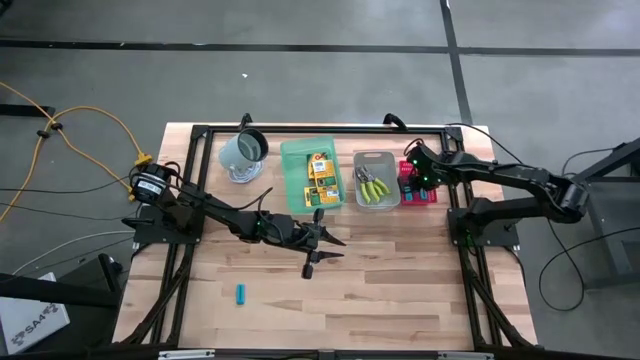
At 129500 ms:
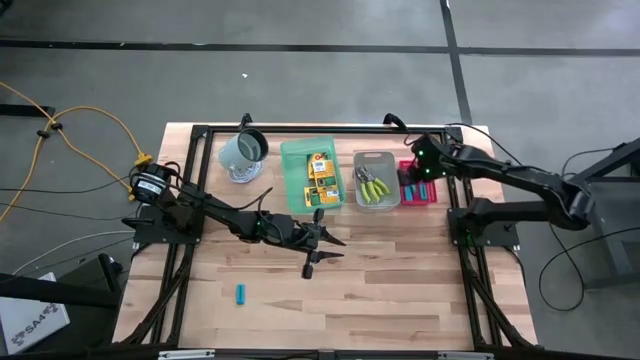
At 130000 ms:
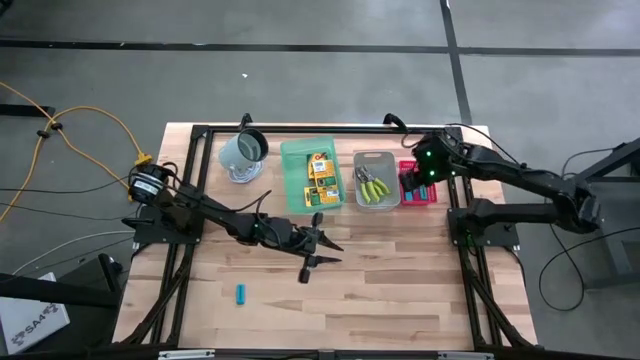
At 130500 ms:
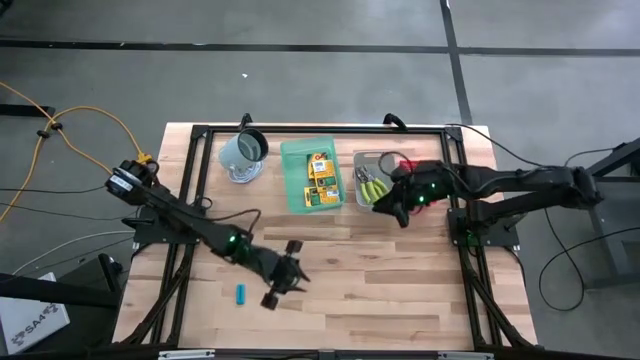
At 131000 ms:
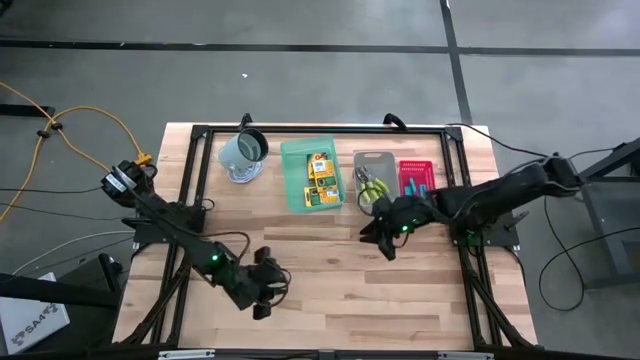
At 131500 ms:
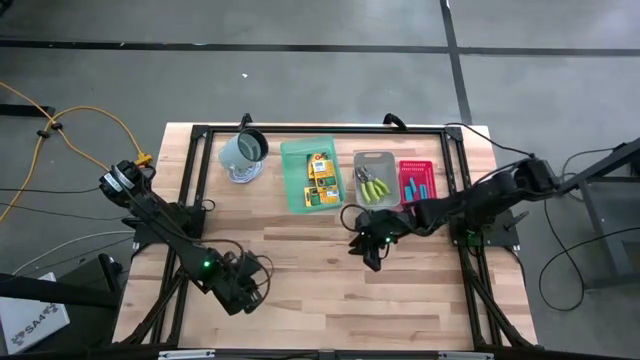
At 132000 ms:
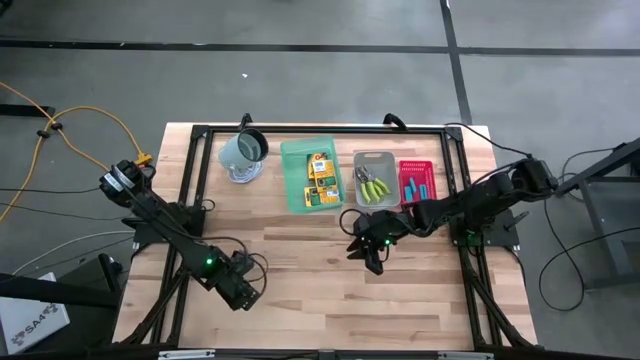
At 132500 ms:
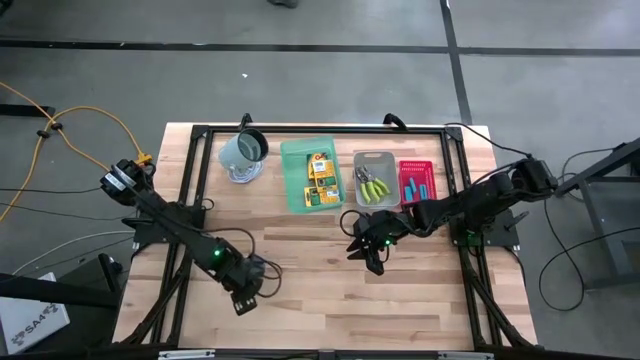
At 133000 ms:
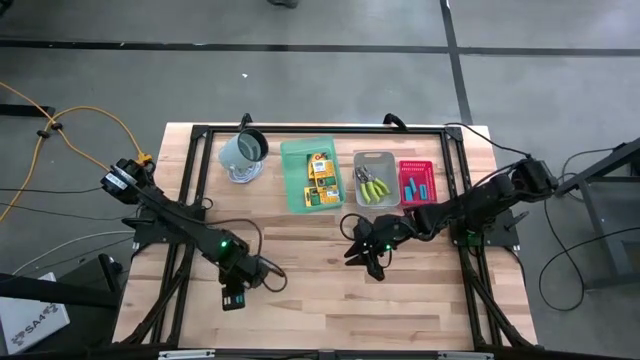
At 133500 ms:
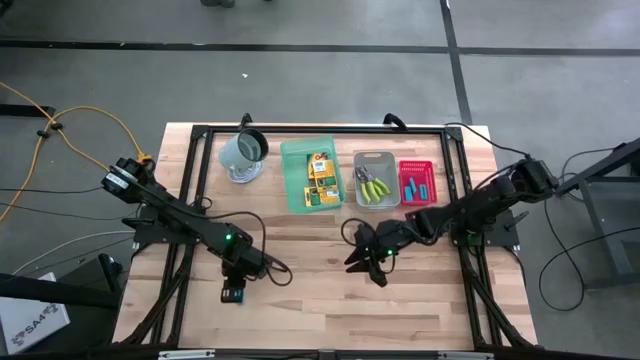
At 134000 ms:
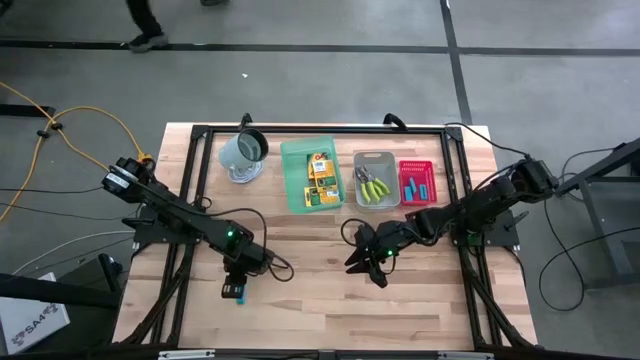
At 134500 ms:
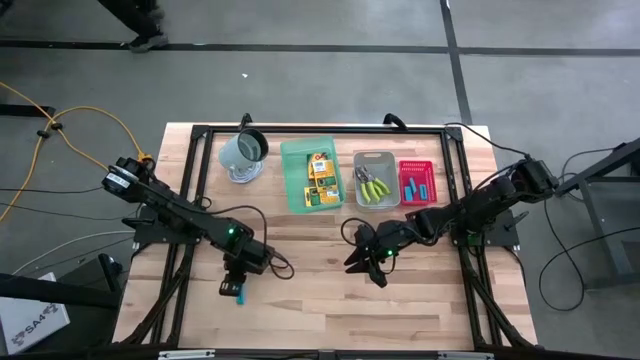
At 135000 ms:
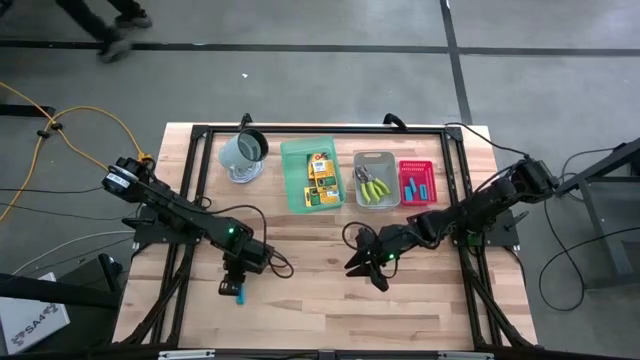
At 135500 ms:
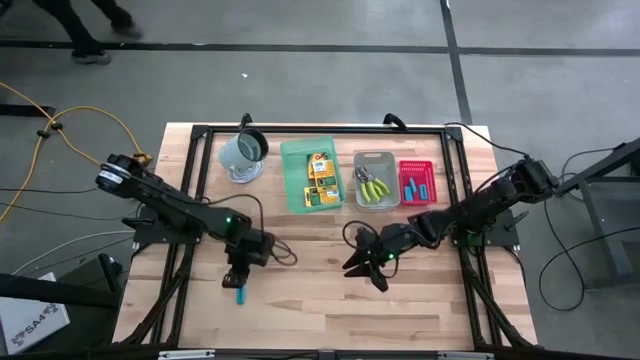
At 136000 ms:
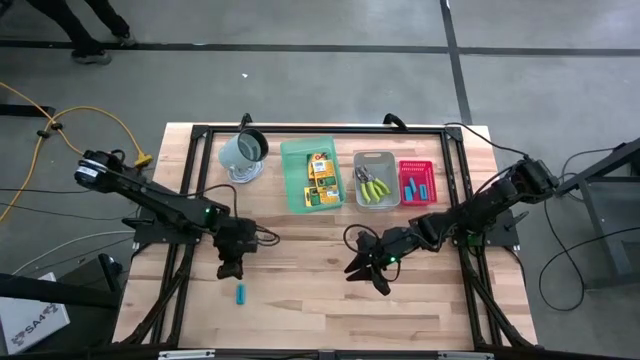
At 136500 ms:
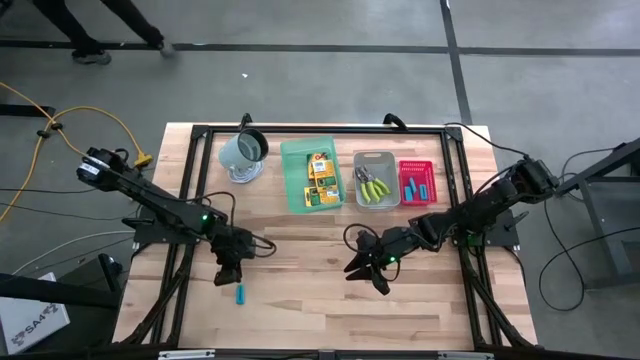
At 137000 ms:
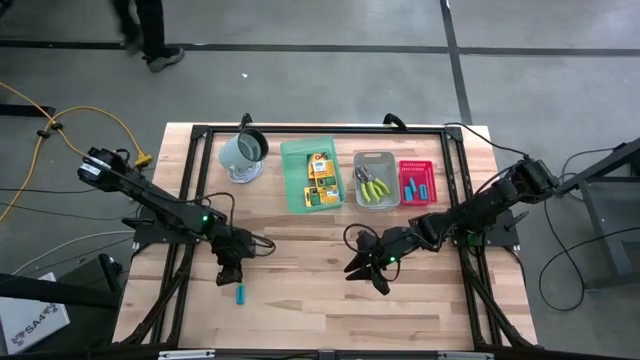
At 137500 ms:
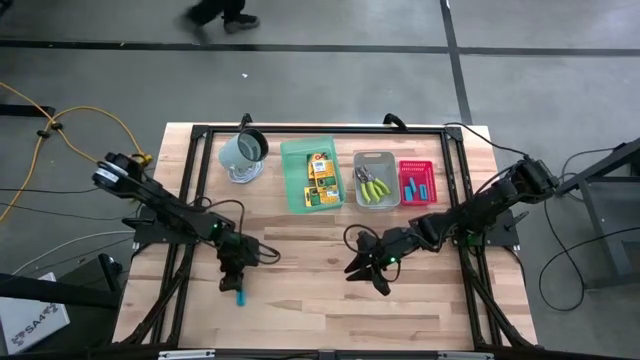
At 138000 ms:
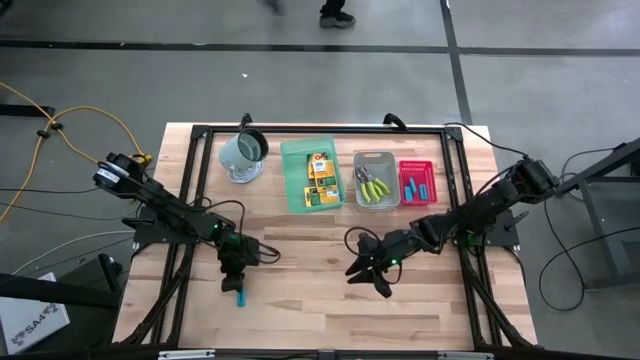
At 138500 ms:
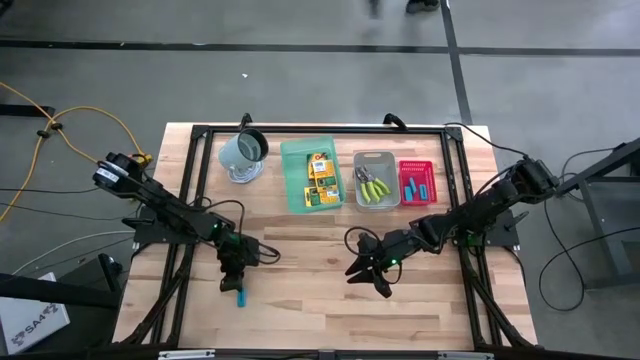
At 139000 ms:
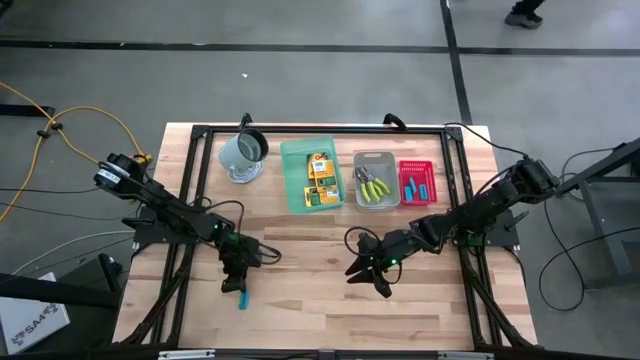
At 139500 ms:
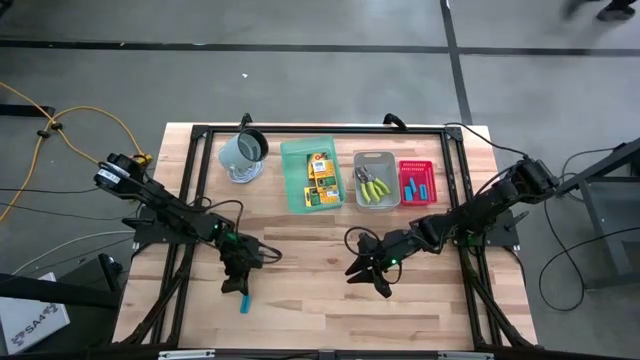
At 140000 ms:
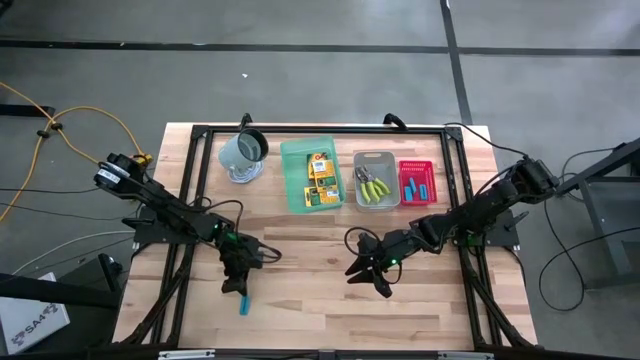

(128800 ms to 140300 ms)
Task: Pick & Place School Supplies
Put the blue eraser into the red bin

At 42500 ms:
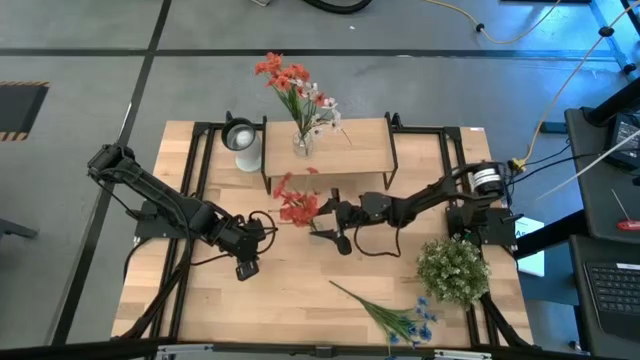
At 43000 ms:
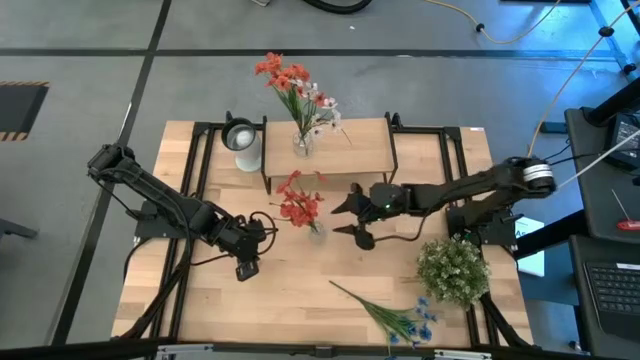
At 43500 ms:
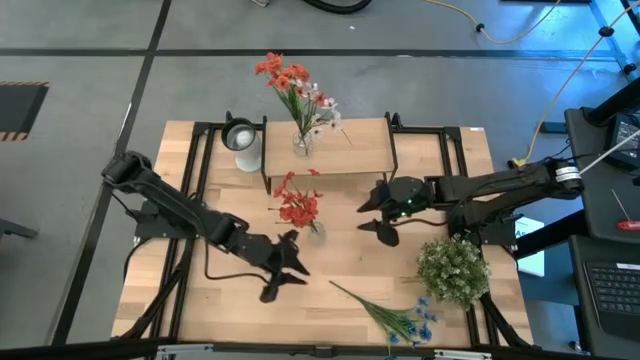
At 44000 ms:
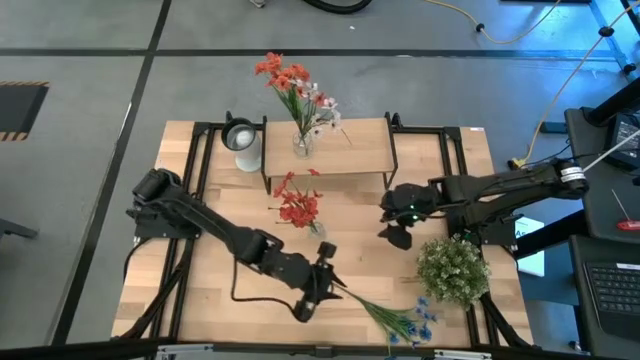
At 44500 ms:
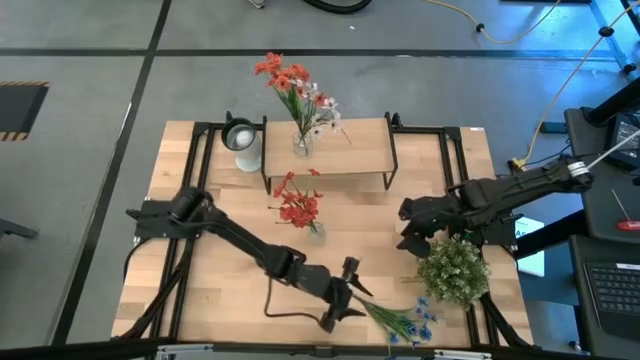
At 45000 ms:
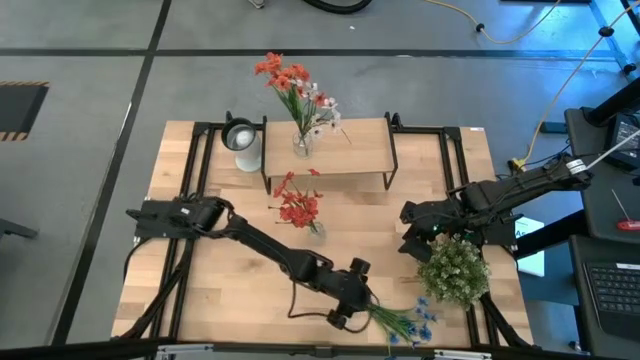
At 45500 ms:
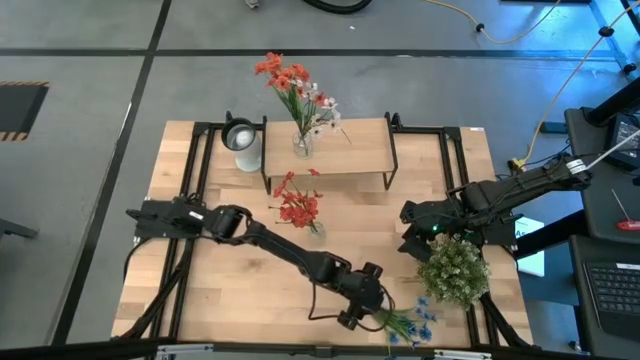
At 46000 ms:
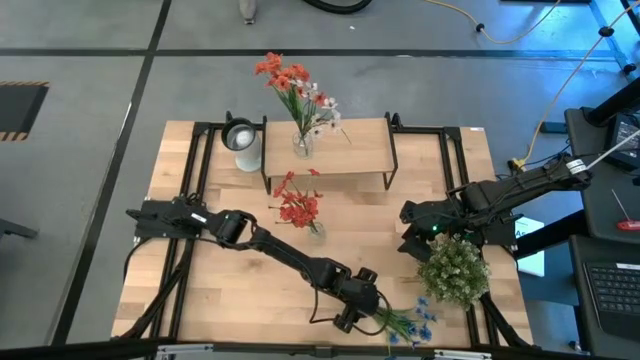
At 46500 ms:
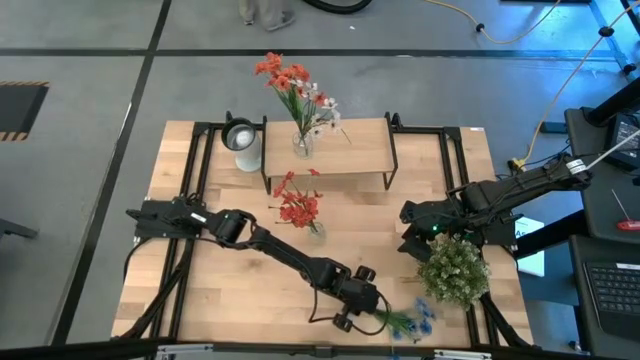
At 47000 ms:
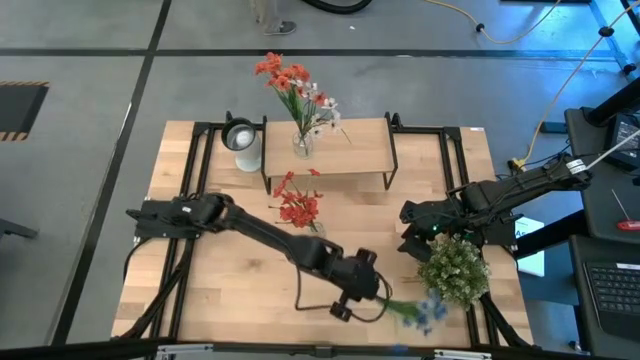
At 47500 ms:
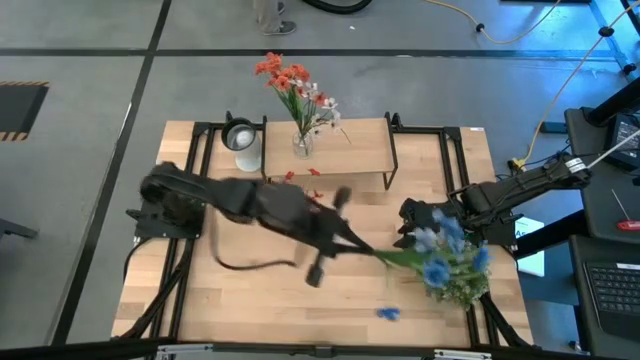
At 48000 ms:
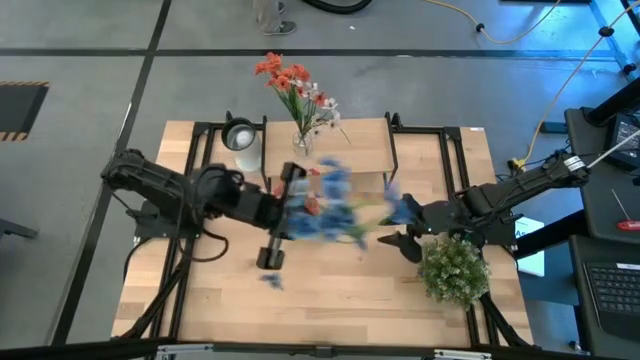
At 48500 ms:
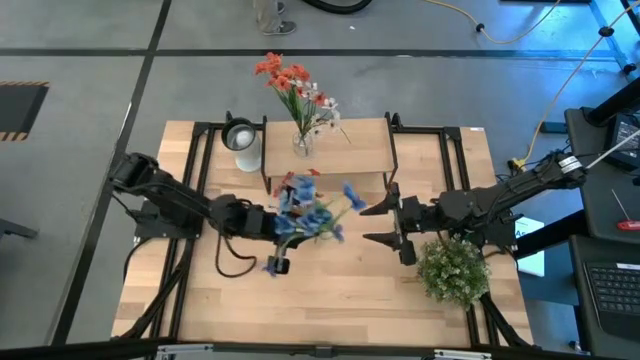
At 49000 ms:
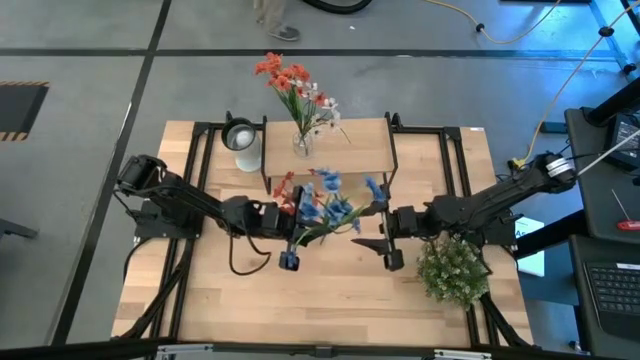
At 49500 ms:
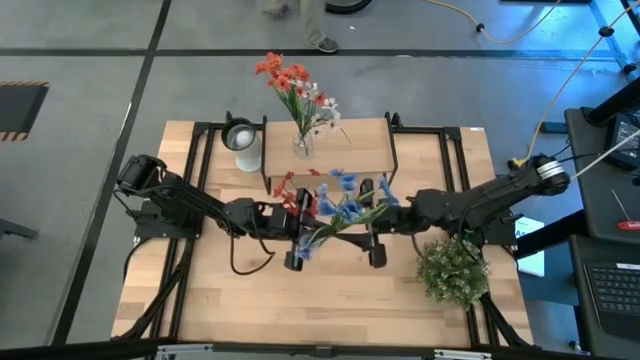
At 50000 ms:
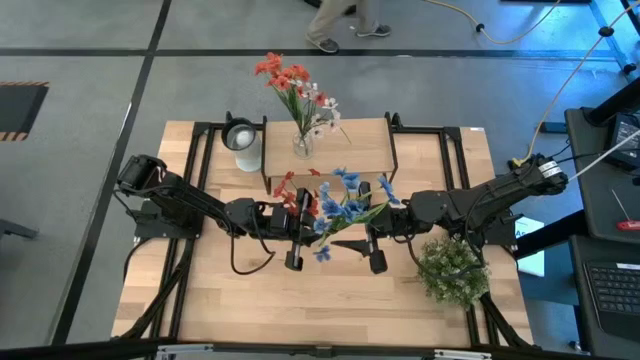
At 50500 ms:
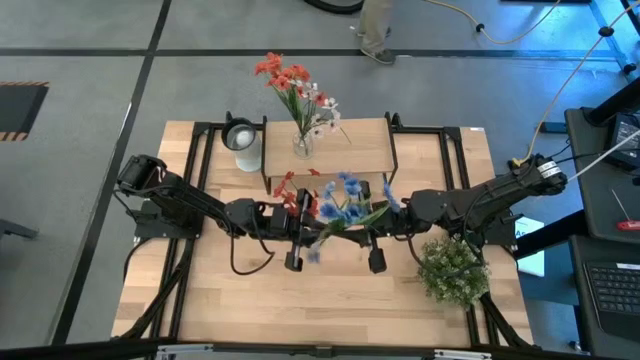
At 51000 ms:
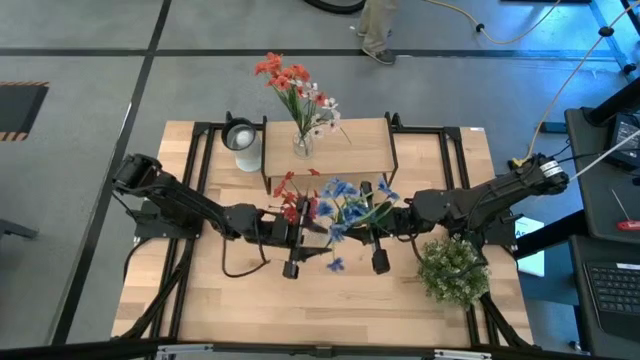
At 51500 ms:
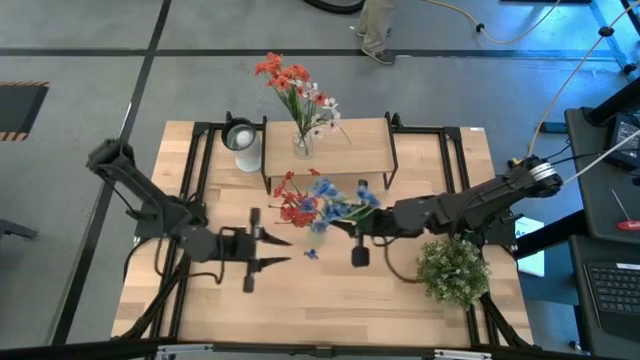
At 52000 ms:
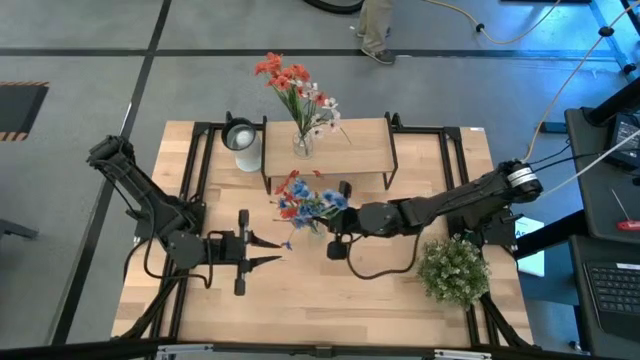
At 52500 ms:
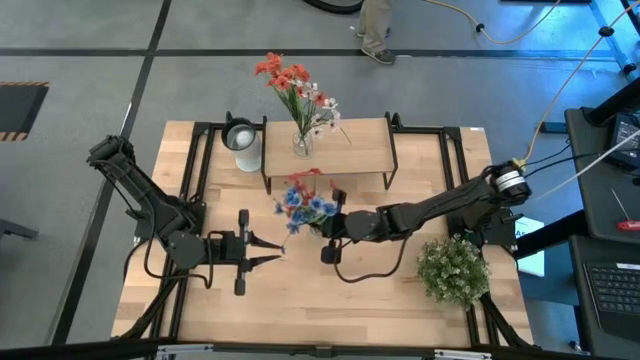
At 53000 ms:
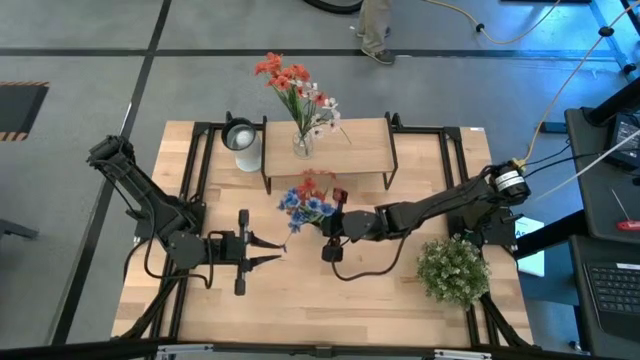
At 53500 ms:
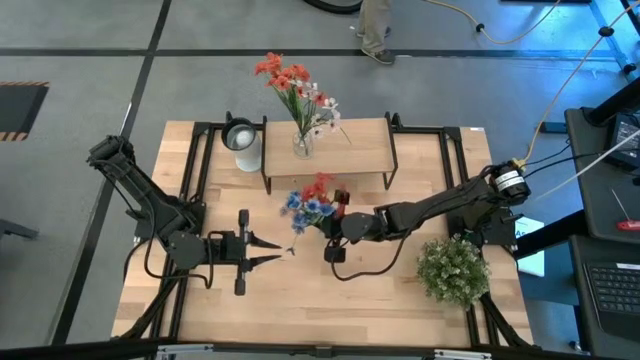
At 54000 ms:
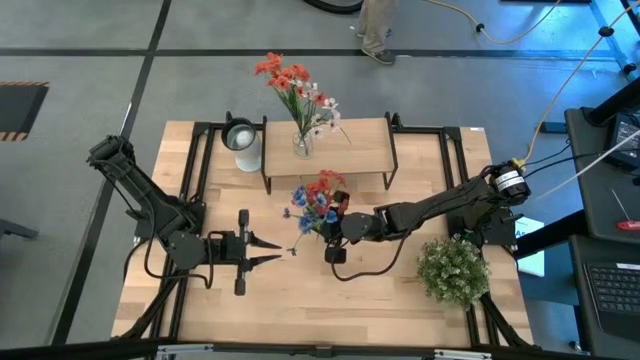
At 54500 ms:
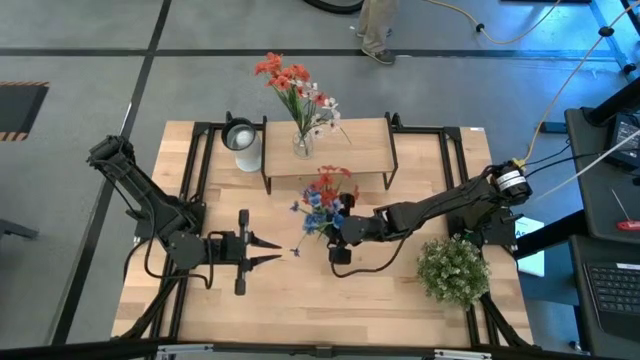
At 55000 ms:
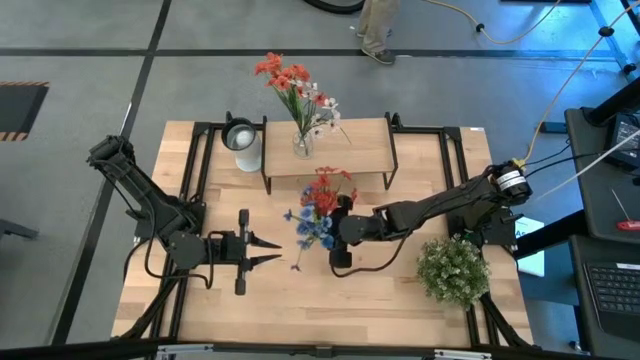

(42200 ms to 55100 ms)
Task: Pick and place flowers into a vace then onto a shelf
Put the blue flowers into the transparent vase
